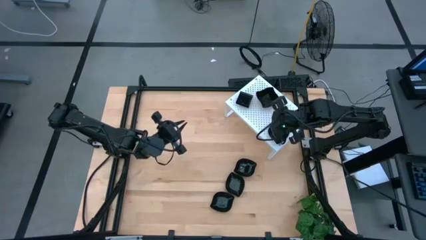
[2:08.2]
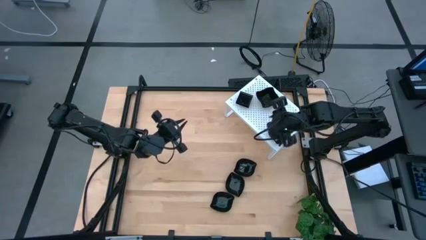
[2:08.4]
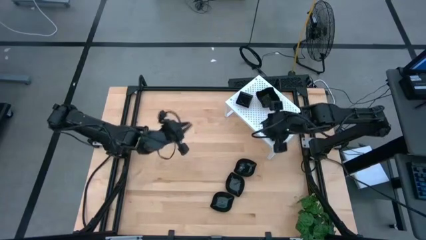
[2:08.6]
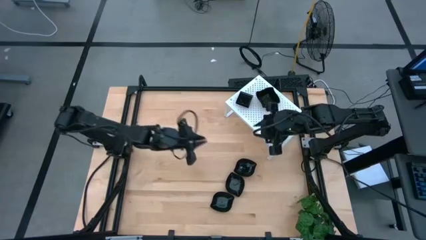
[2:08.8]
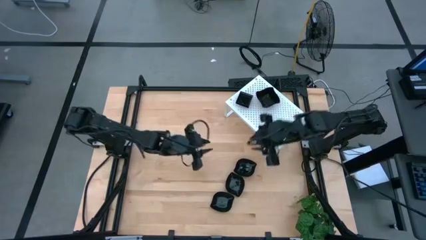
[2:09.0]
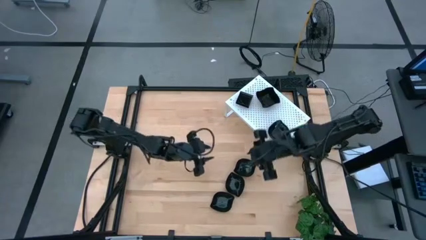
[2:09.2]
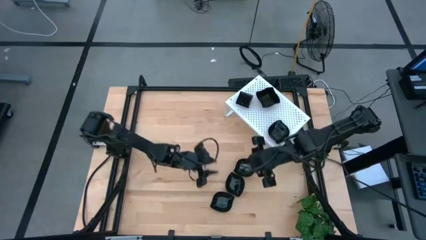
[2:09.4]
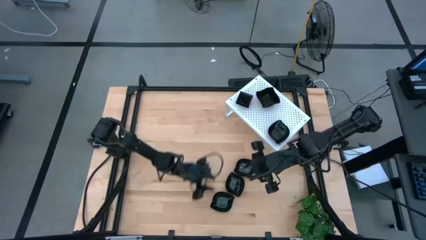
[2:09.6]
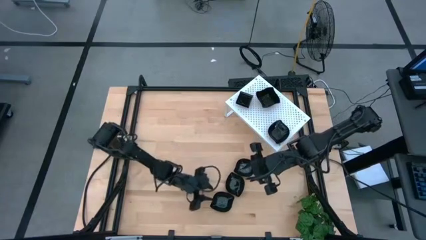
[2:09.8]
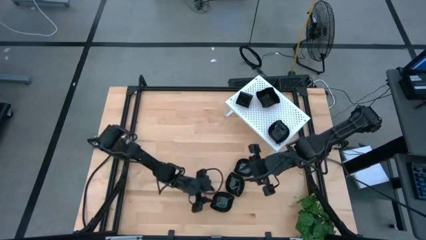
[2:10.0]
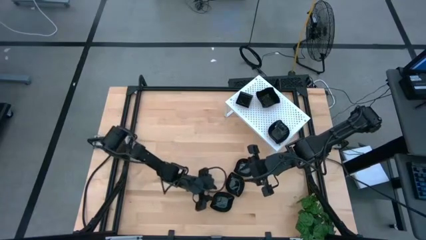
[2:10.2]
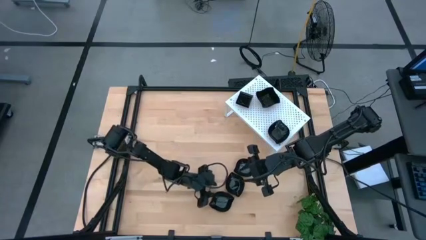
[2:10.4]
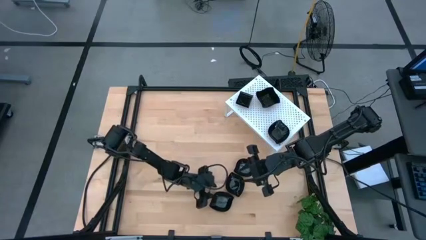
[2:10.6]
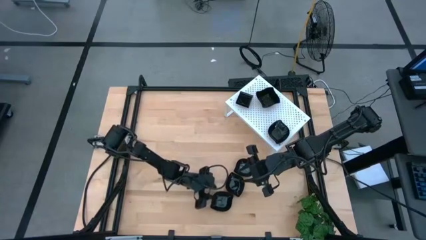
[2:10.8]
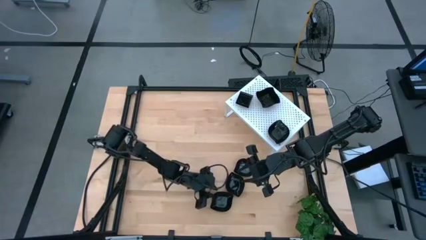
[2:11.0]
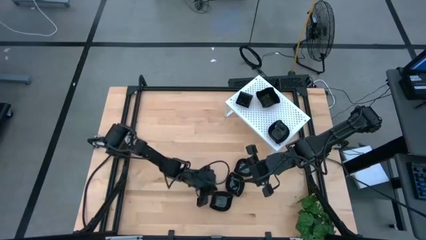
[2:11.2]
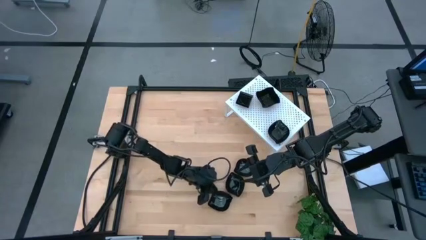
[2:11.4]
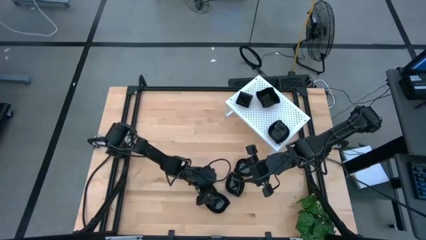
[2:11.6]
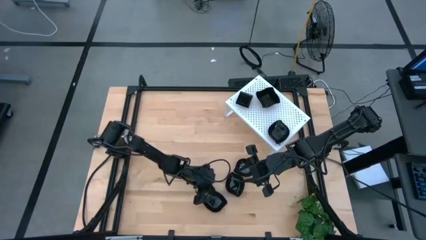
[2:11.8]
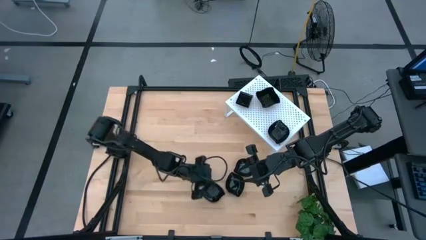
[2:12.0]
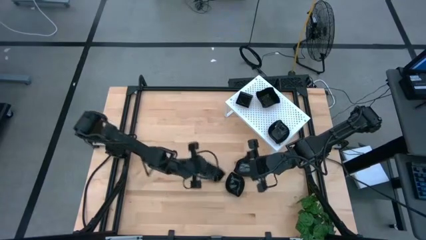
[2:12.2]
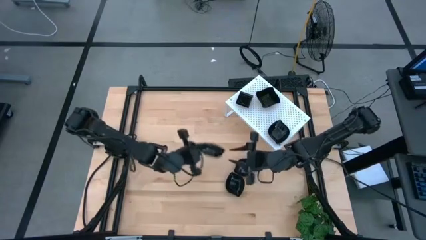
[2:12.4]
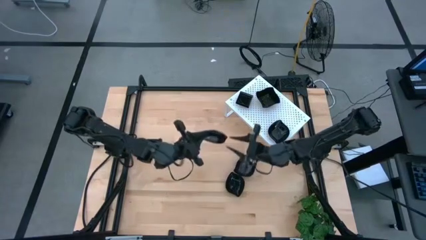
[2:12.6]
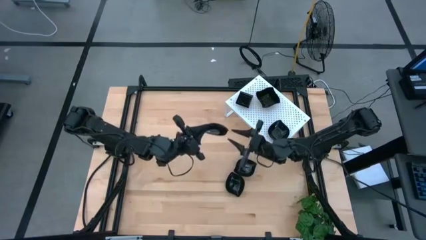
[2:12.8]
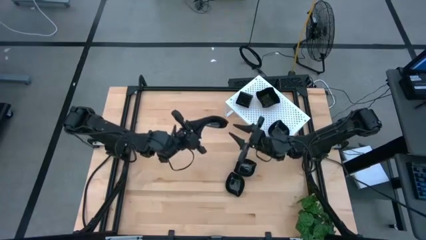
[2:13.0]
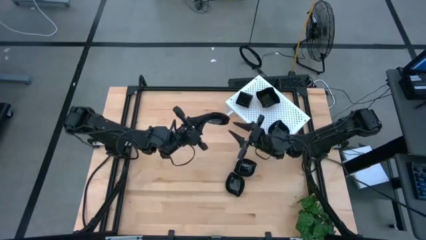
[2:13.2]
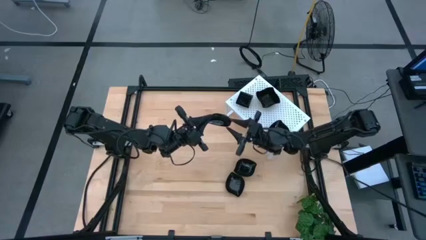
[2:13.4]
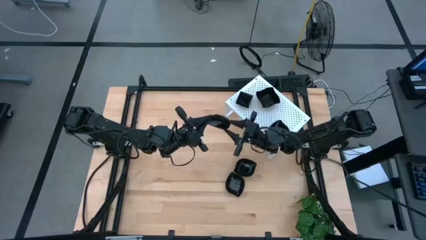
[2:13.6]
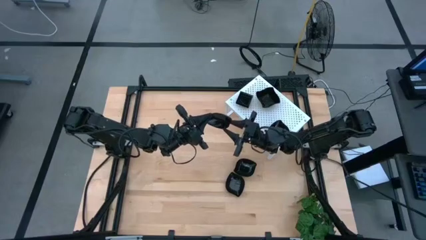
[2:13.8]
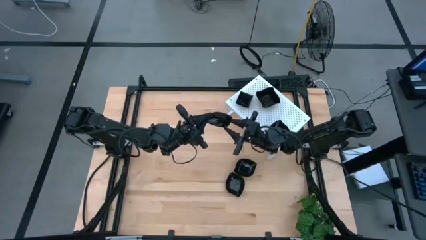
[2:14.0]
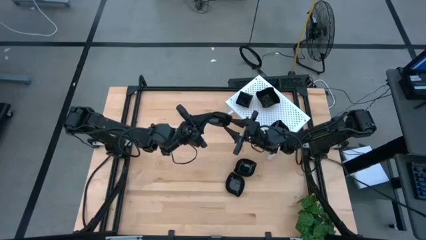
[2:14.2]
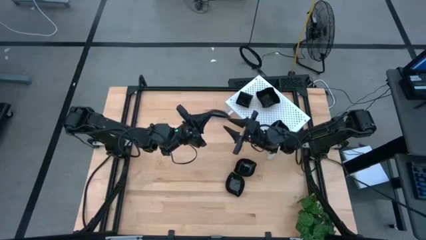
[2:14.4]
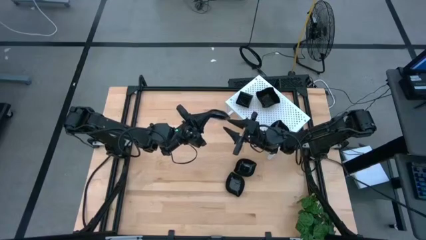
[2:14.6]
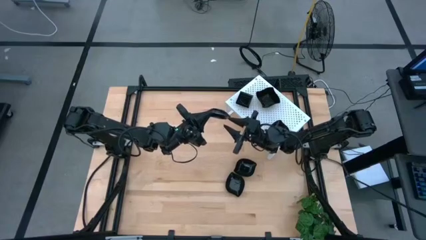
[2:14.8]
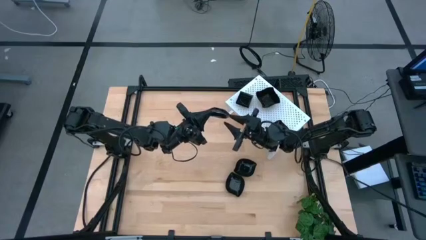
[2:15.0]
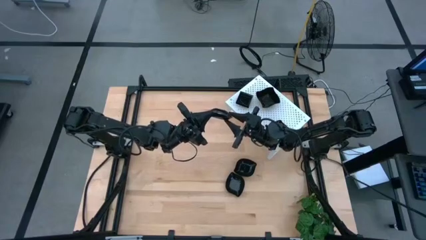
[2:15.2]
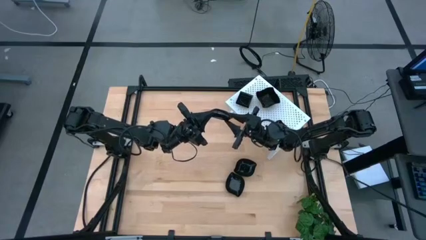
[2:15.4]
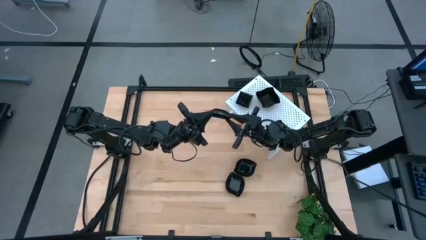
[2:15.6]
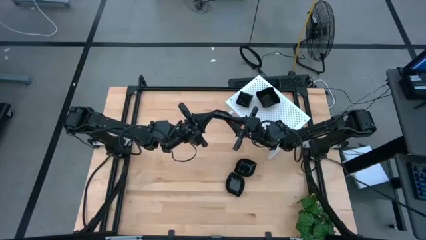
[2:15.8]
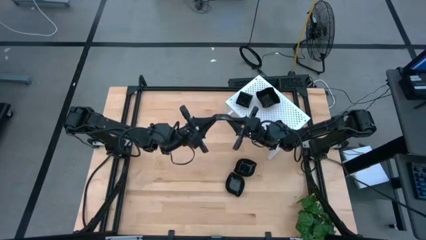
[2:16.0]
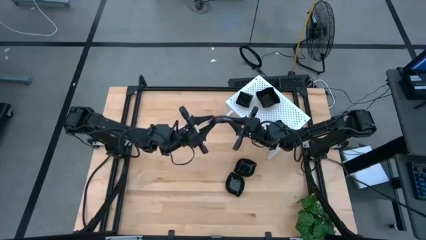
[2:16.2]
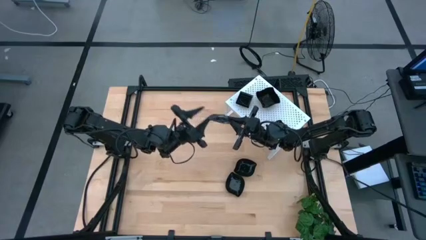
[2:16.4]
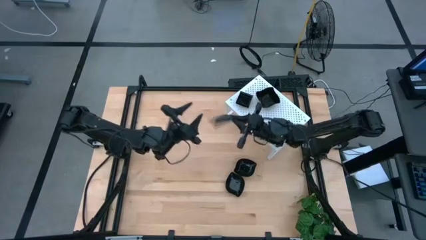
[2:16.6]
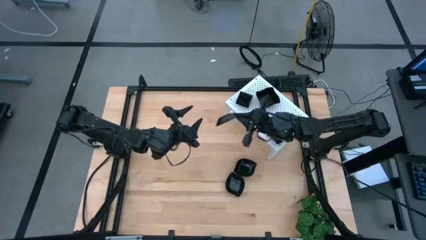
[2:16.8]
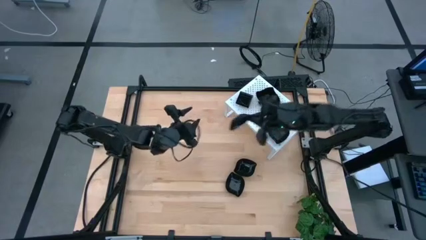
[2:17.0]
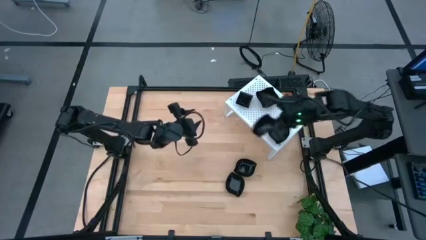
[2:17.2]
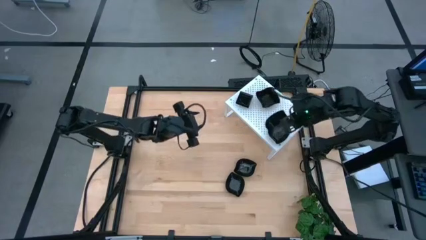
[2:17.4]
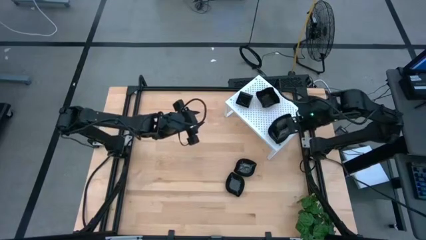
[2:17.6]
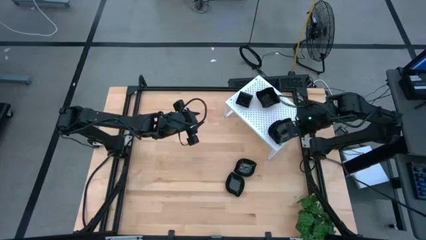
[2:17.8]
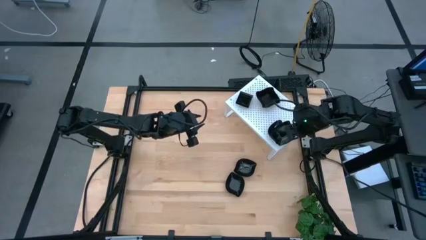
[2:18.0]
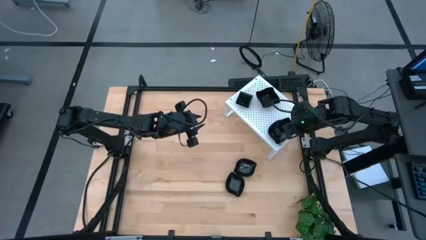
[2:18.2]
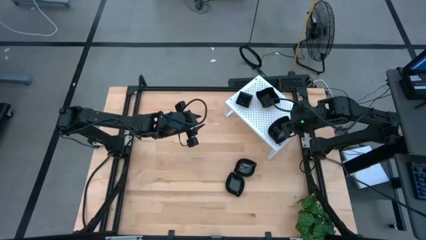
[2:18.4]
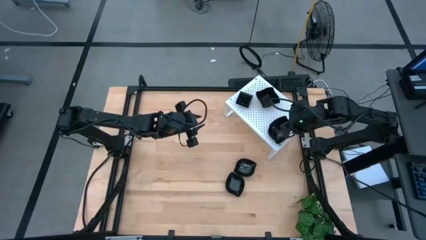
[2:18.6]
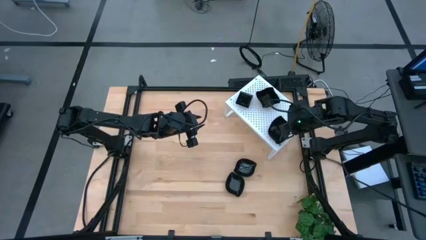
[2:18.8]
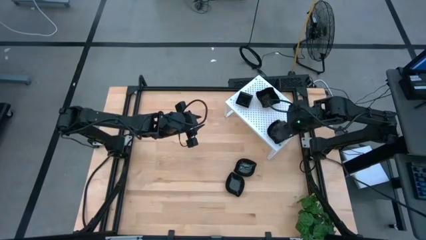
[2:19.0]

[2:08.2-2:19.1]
Task: Pick & Place Mini shaped plates
Stack the black leaf shaped plate on top of the other black leaf shaped plates on the shelf

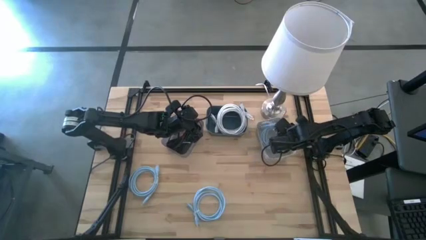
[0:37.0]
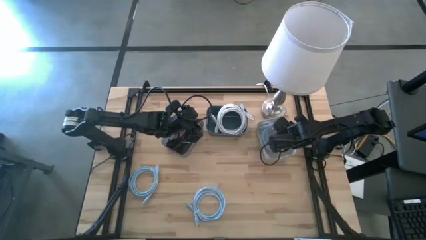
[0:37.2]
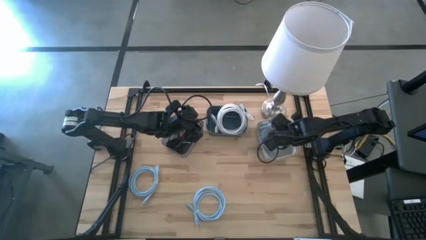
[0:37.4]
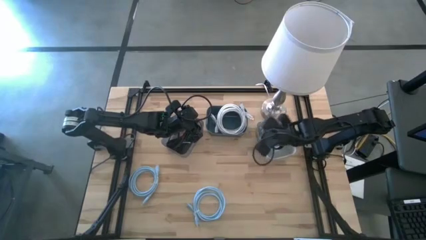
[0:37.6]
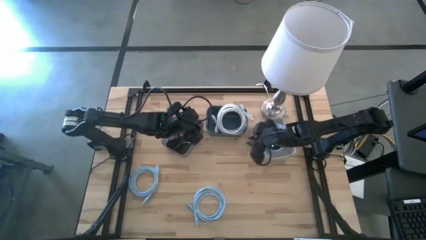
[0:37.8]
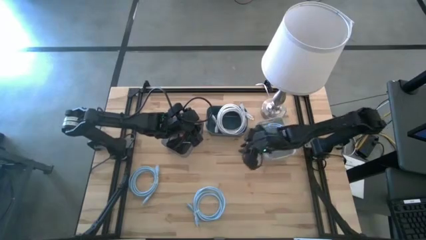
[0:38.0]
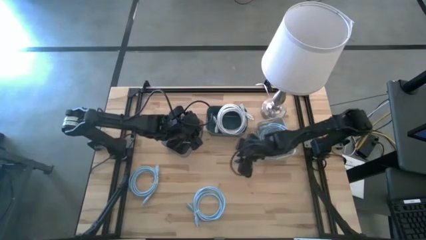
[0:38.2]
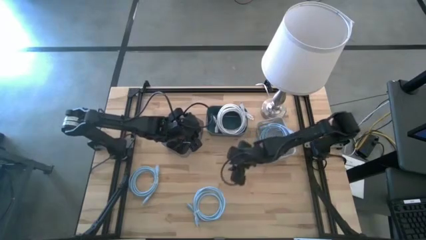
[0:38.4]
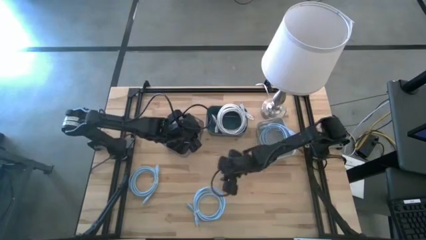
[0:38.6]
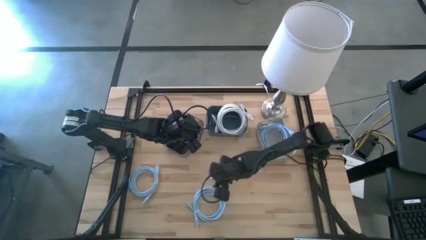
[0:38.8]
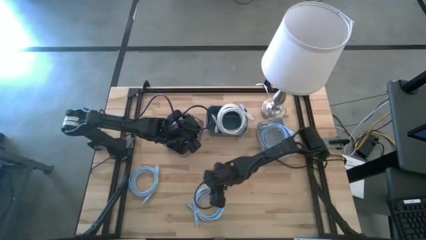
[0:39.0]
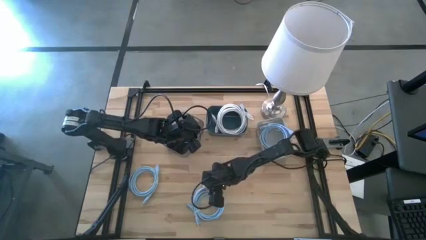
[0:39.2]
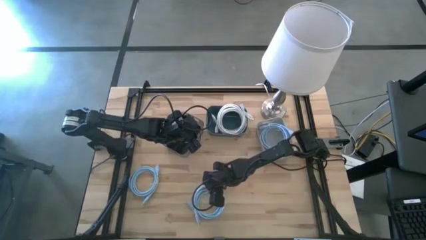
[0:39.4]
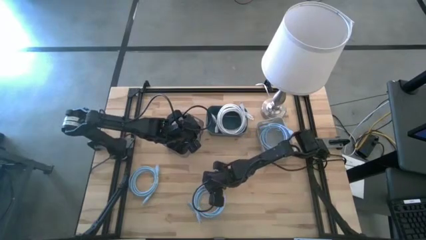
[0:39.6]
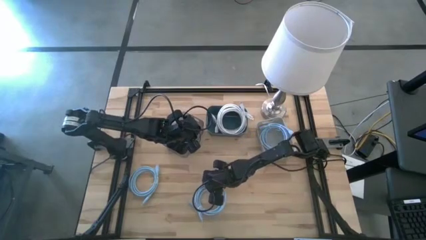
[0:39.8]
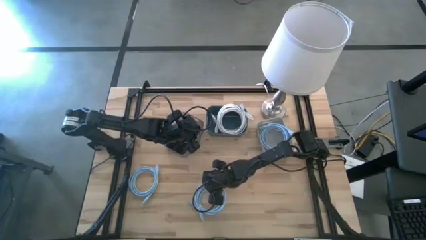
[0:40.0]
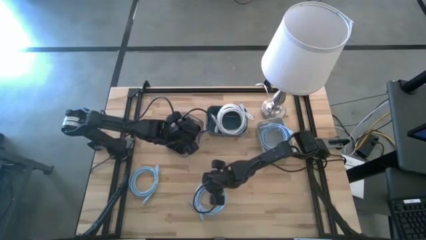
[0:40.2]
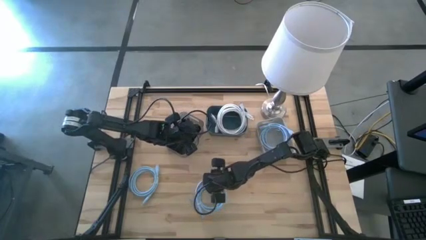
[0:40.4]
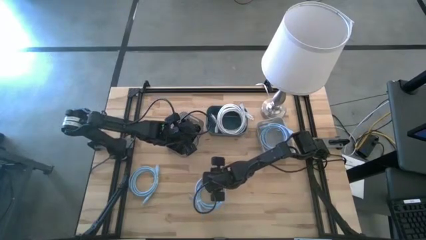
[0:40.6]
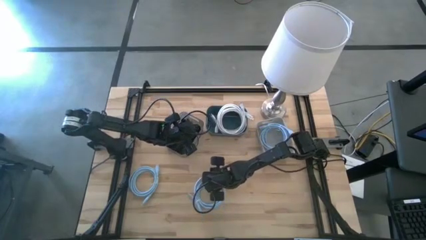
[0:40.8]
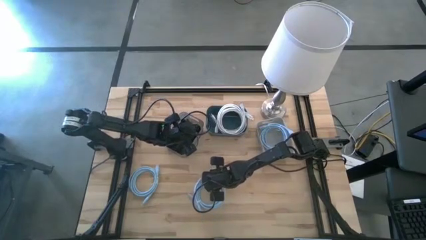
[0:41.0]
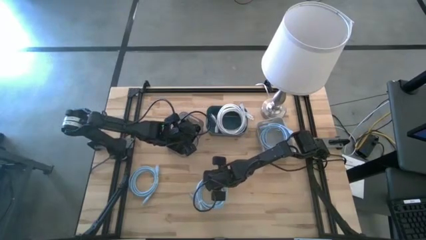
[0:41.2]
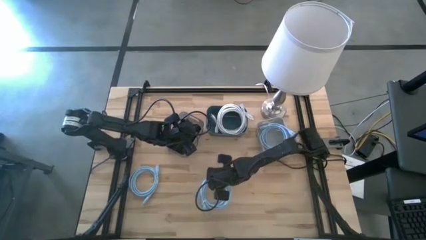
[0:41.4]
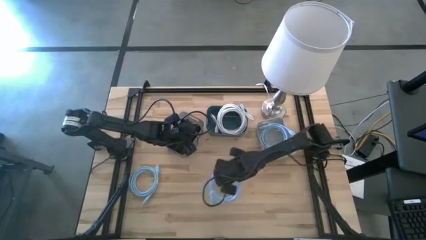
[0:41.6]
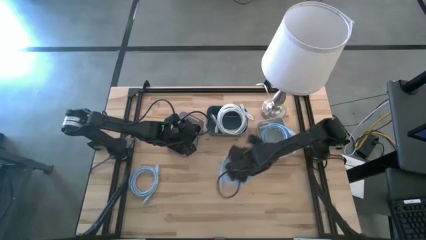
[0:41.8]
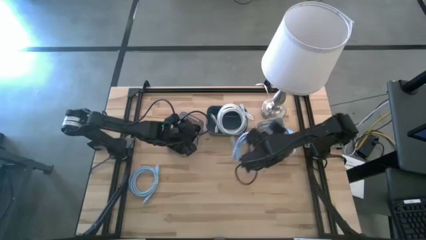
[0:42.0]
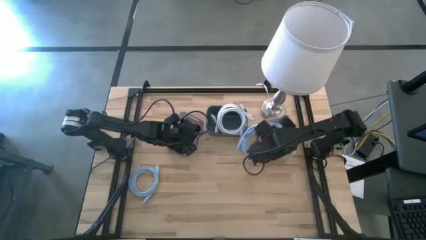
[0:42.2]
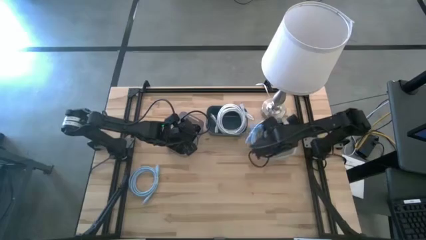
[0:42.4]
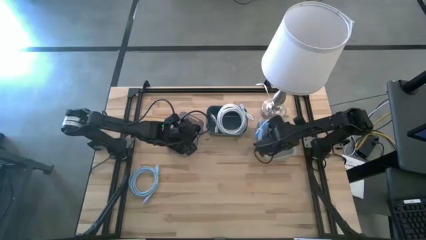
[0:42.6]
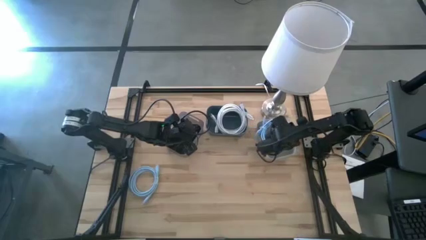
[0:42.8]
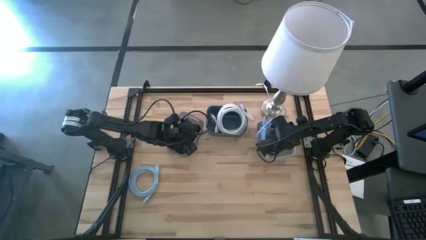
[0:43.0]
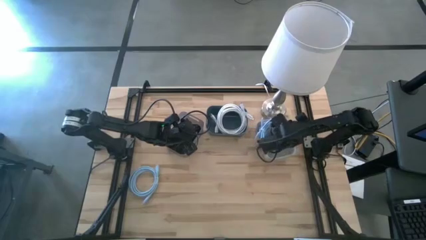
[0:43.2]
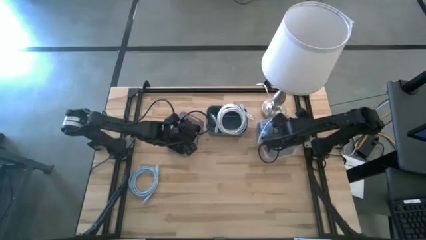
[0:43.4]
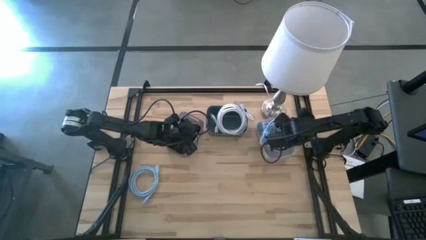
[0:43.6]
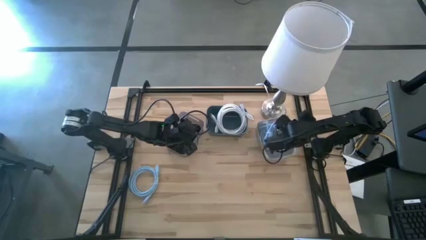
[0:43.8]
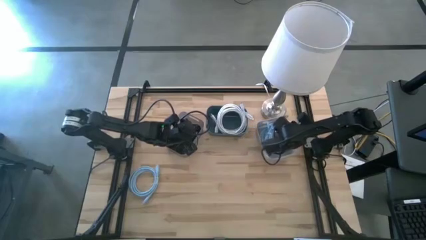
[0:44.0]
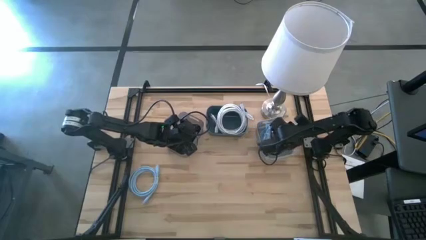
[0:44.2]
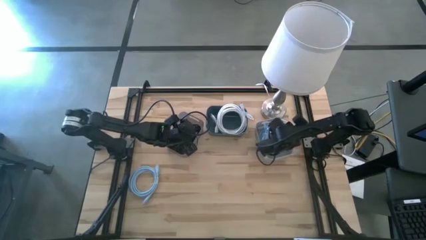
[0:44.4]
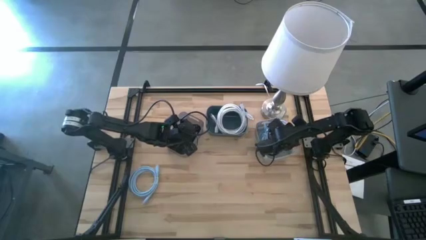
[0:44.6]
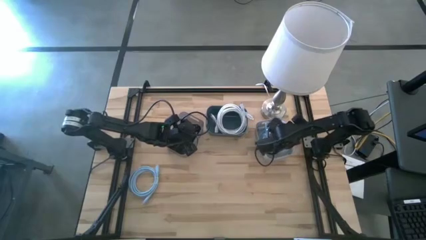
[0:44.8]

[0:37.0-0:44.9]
Task: Sort HDMI cables
Put the right blue HDMI cable into the white bin
